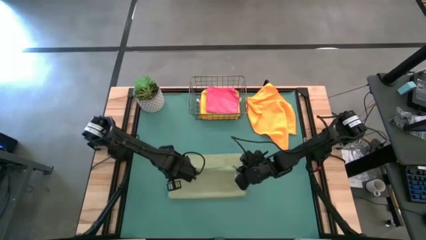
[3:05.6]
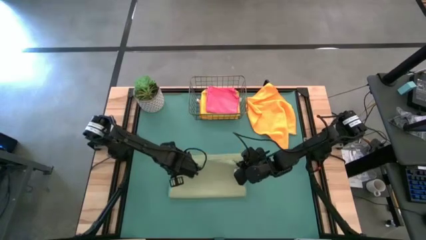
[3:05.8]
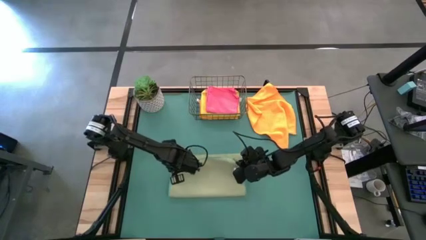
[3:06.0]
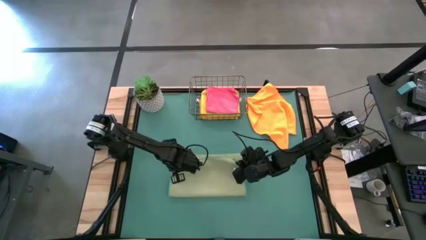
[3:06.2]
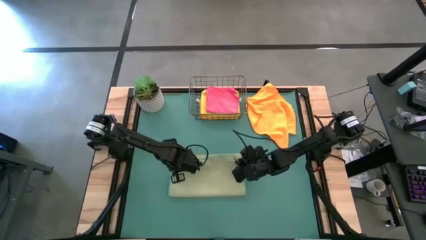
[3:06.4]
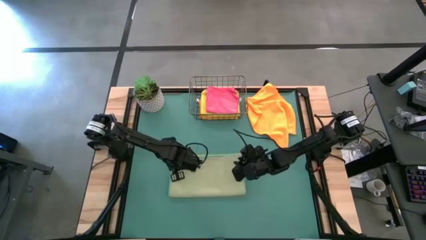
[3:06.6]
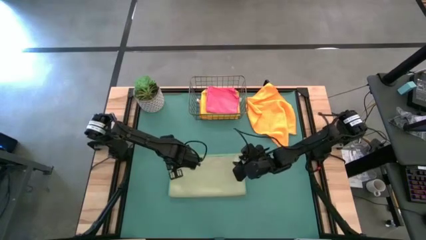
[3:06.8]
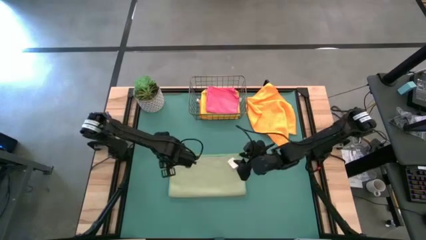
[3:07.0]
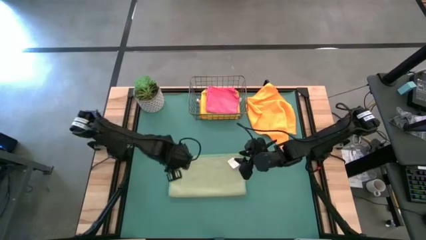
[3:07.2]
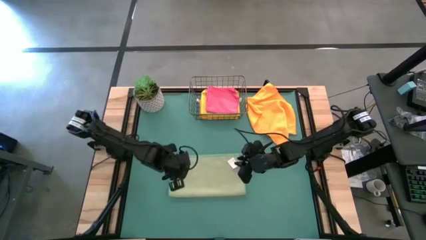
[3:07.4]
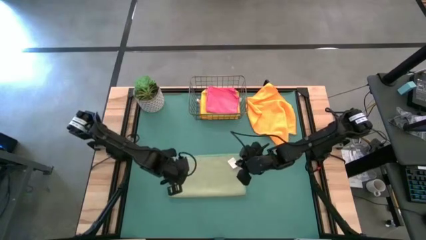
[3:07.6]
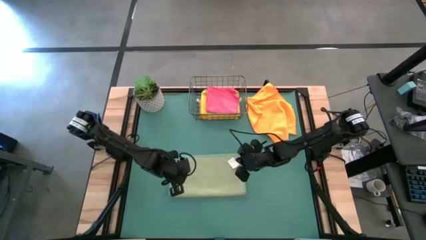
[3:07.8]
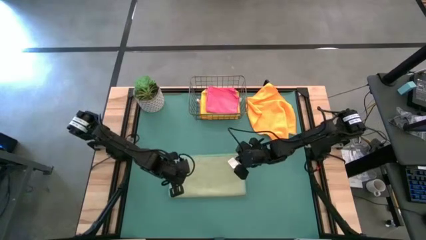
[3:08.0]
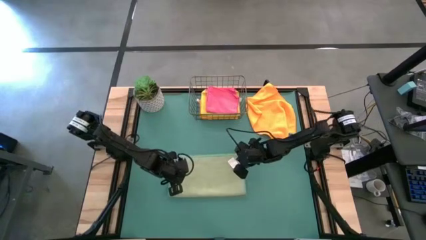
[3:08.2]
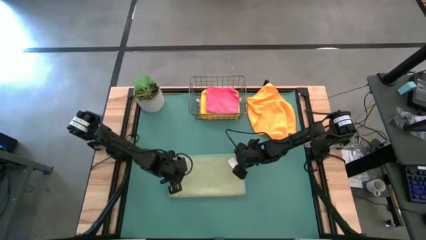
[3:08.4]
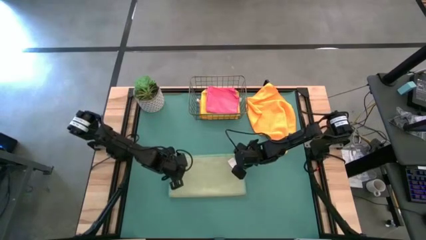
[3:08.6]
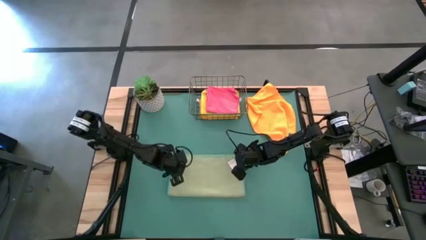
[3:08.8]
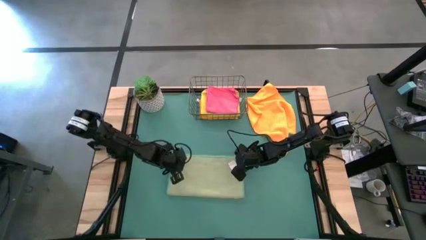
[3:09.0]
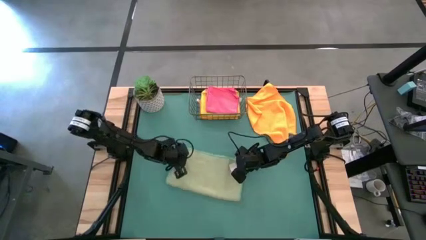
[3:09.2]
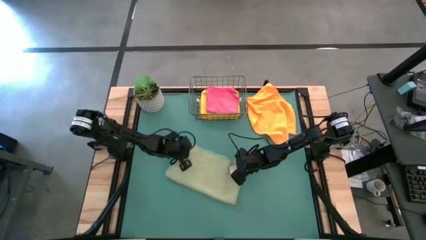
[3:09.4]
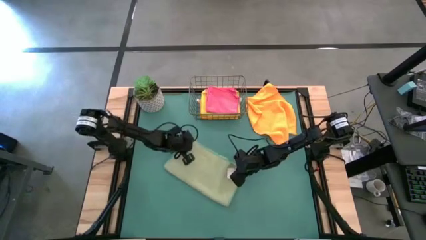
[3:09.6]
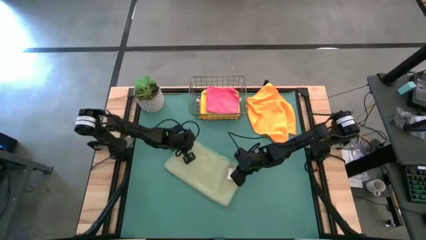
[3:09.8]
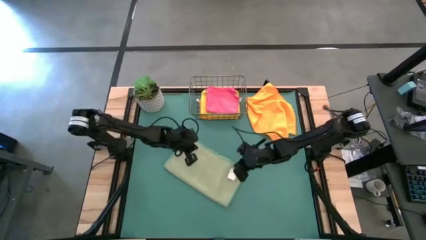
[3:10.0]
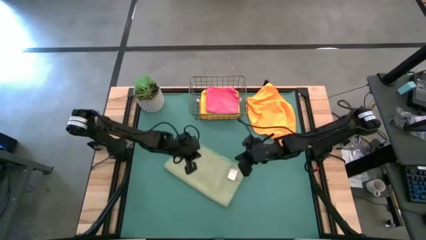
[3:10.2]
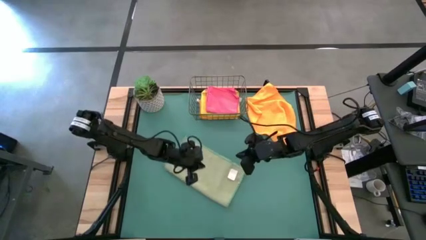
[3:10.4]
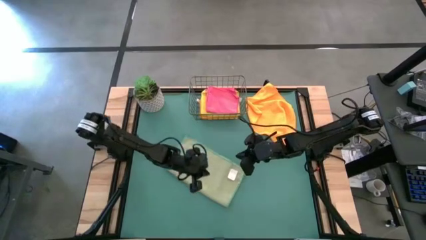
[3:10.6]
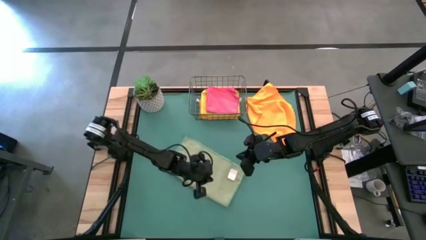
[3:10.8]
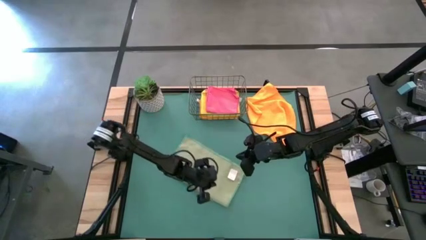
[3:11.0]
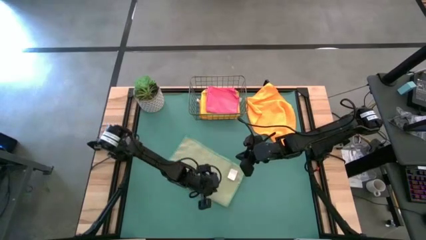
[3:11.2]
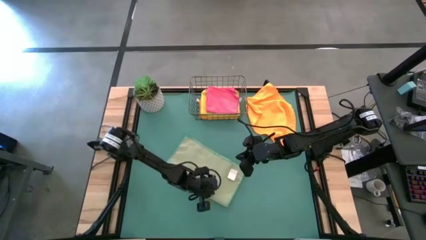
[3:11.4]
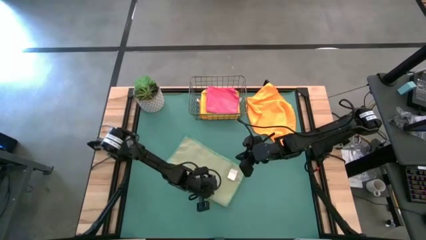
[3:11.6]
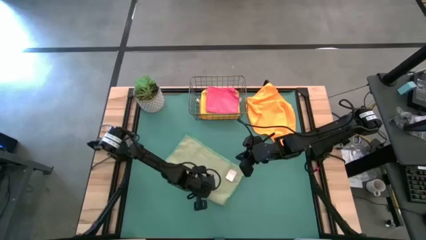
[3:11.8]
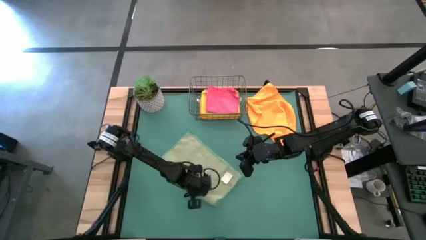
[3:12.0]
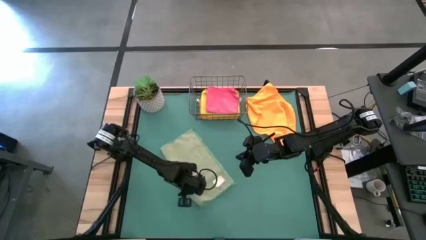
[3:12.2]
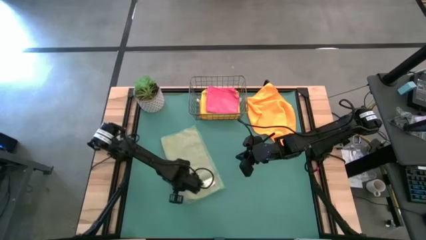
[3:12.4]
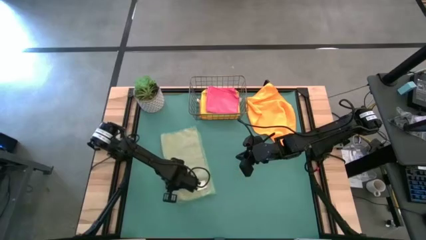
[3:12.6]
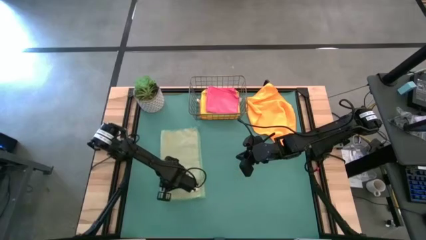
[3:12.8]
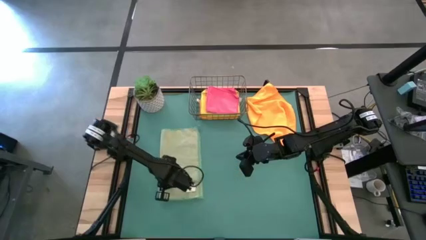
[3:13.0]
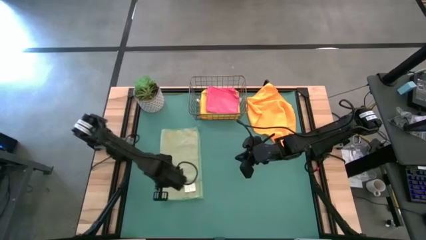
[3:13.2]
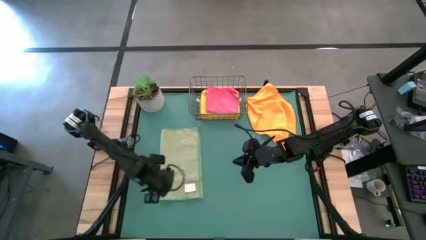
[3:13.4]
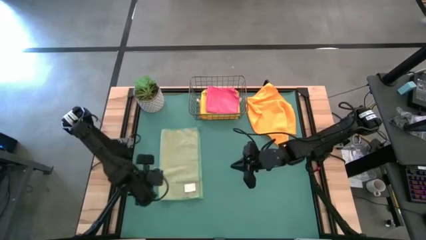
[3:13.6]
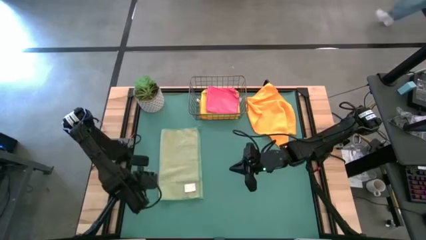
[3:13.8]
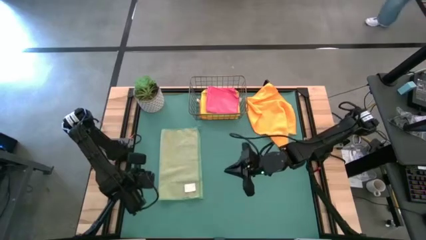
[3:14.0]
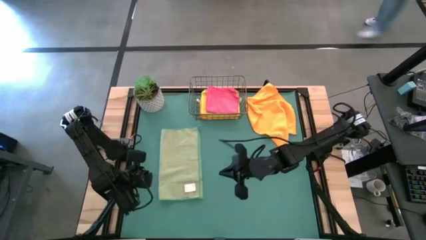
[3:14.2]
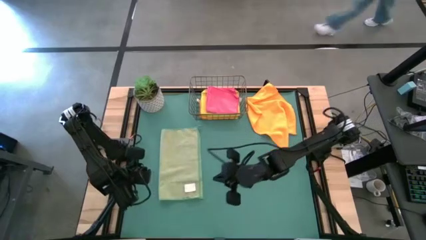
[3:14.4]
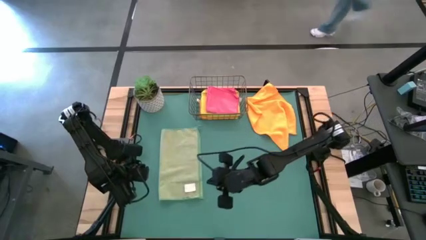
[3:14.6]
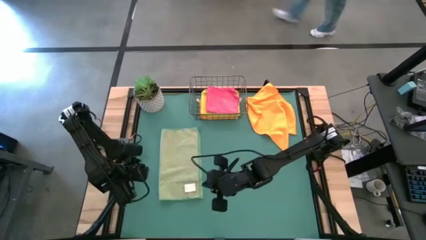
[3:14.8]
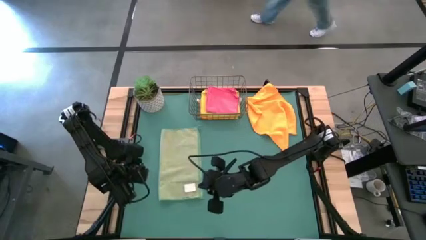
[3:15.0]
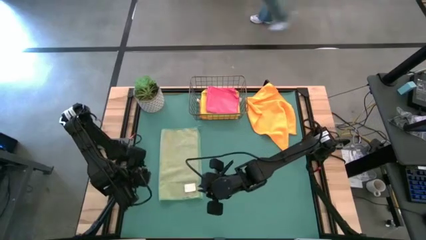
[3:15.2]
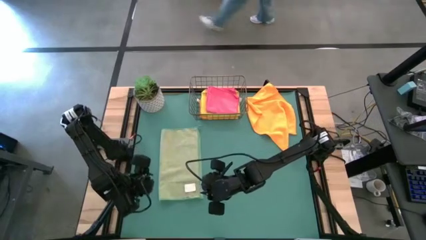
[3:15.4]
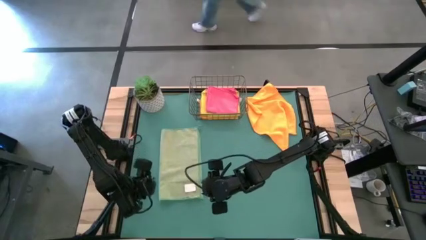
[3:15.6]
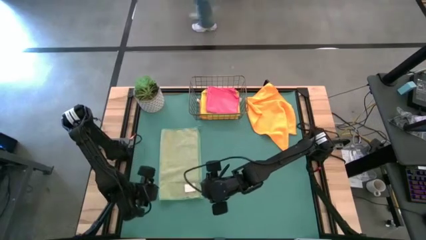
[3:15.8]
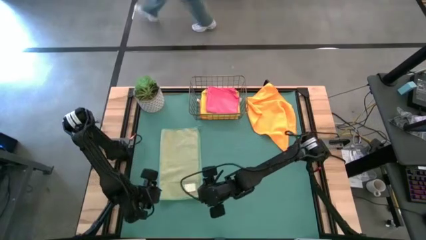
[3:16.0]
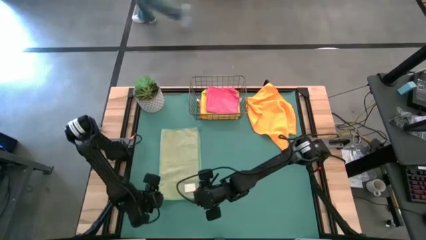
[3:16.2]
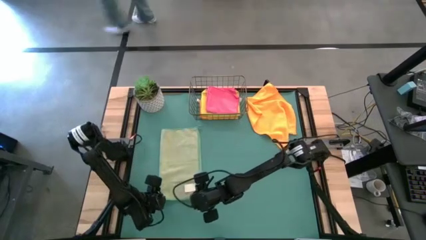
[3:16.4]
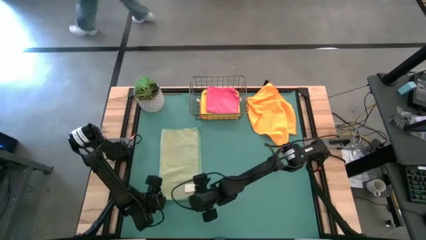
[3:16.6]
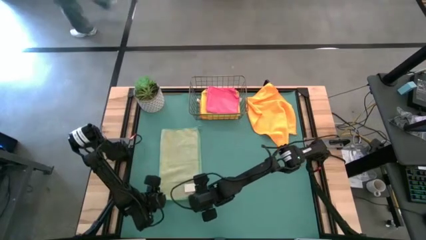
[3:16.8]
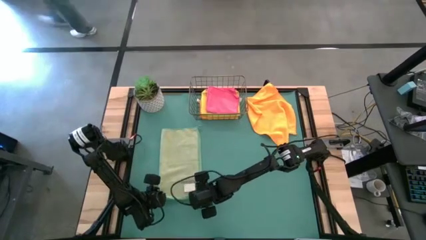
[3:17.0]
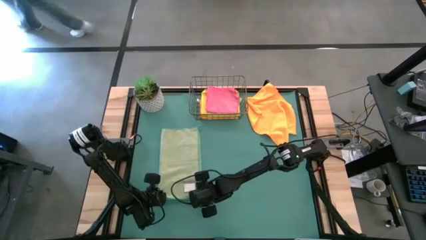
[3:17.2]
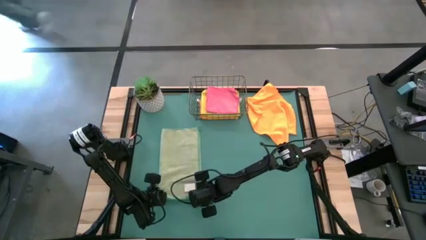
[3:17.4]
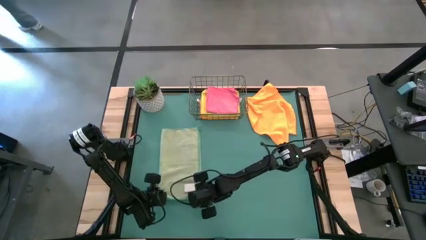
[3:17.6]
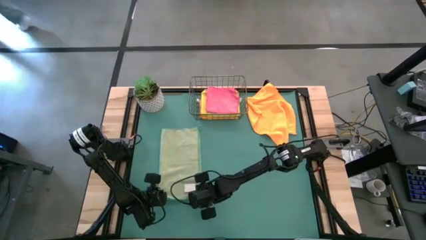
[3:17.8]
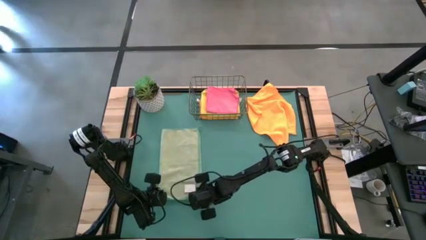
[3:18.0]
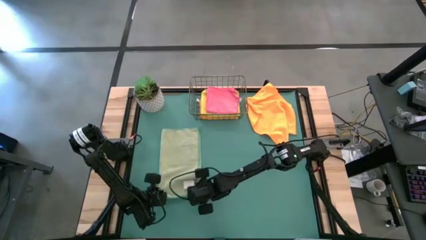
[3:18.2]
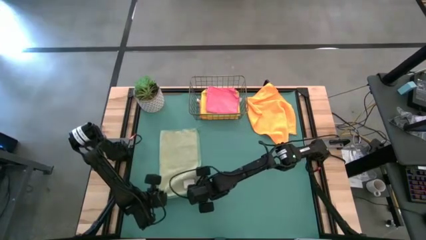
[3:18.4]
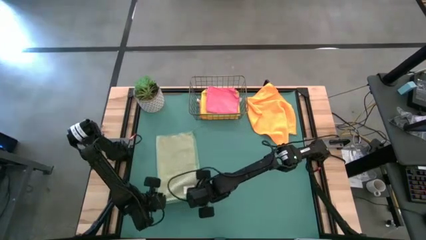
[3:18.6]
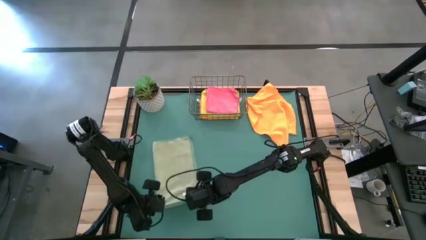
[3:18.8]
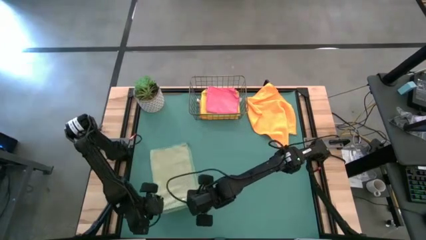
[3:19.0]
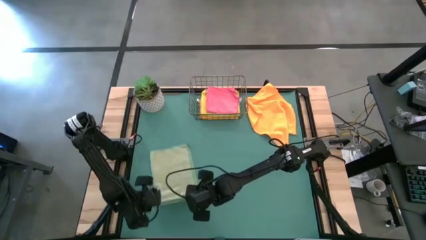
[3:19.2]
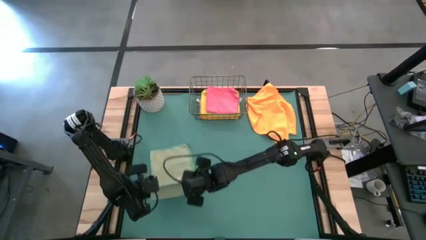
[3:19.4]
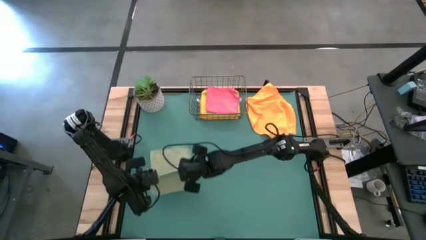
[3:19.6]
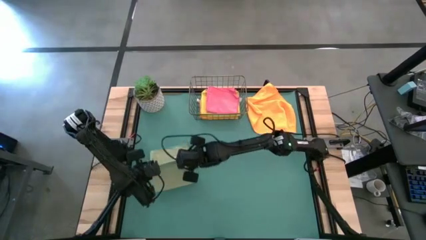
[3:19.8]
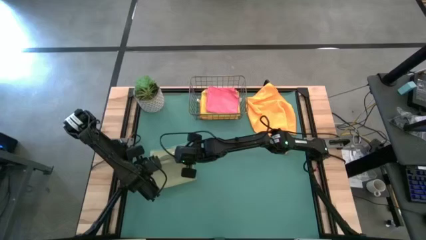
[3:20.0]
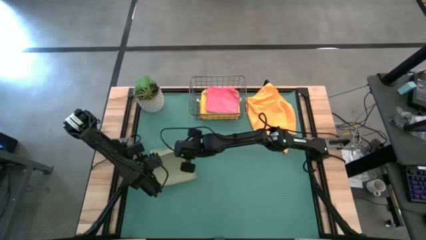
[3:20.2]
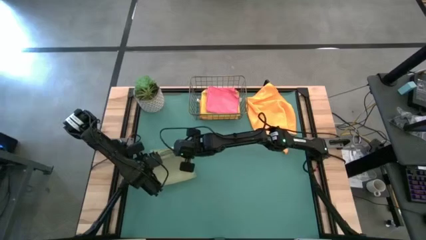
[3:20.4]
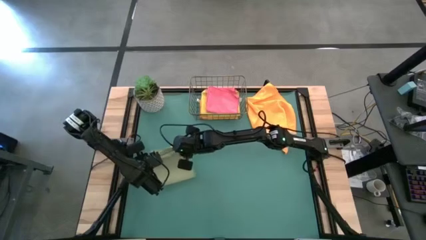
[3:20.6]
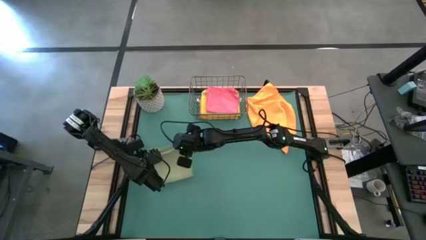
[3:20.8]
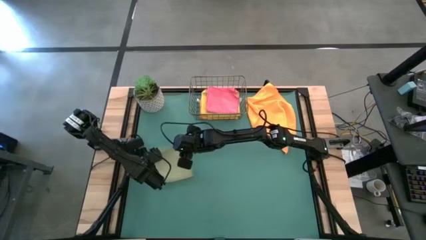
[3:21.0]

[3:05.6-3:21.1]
Task: Fold microfiber towels
Fold the green microfiber cloth
